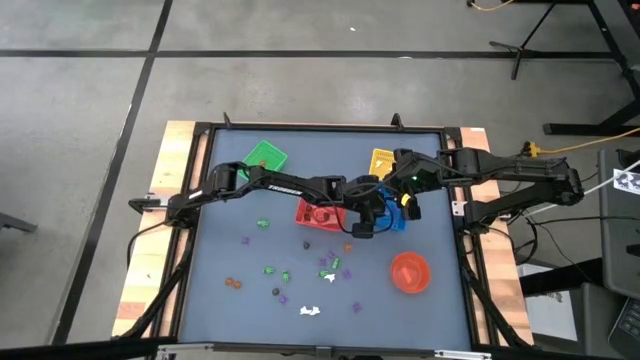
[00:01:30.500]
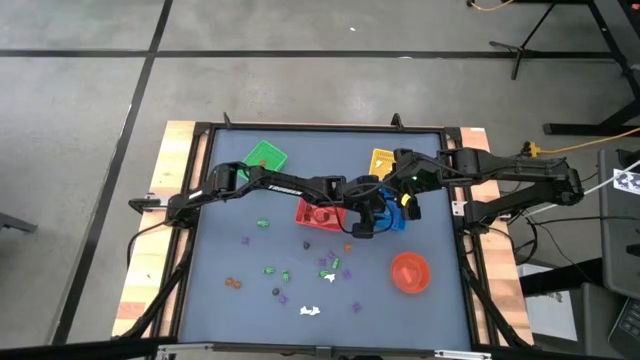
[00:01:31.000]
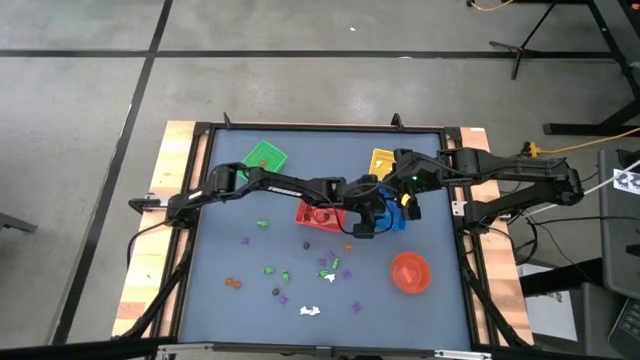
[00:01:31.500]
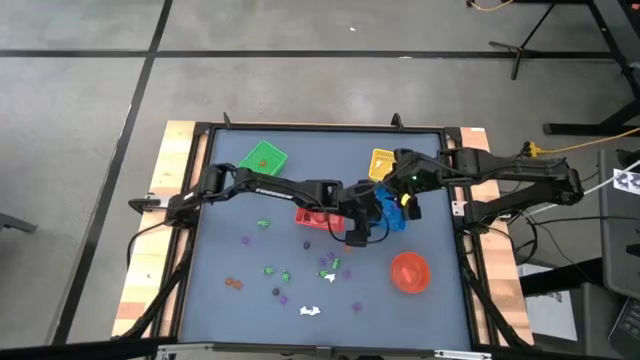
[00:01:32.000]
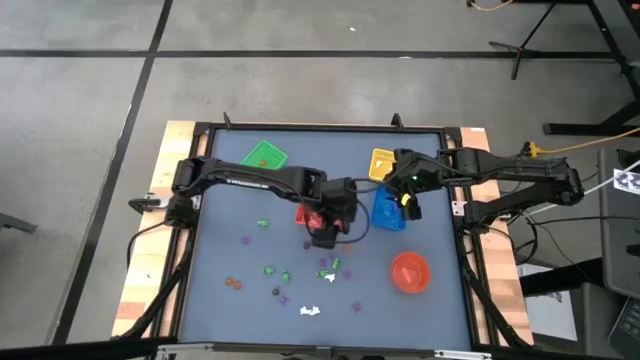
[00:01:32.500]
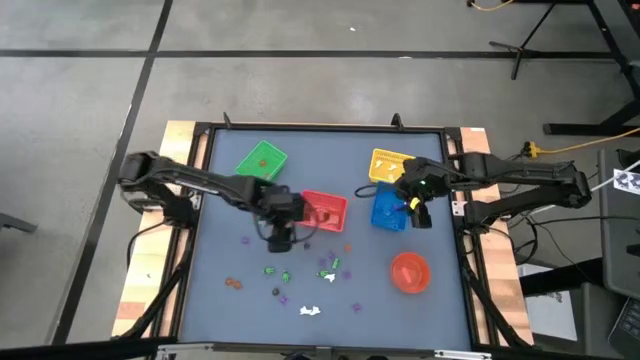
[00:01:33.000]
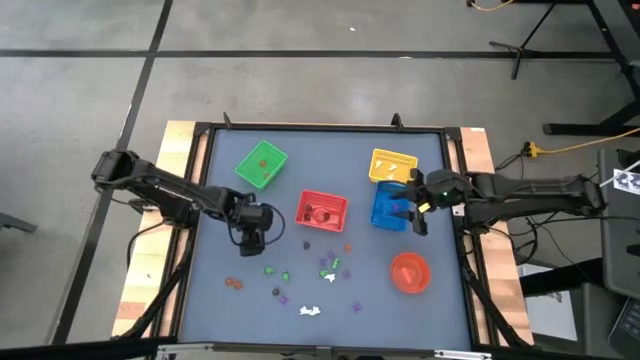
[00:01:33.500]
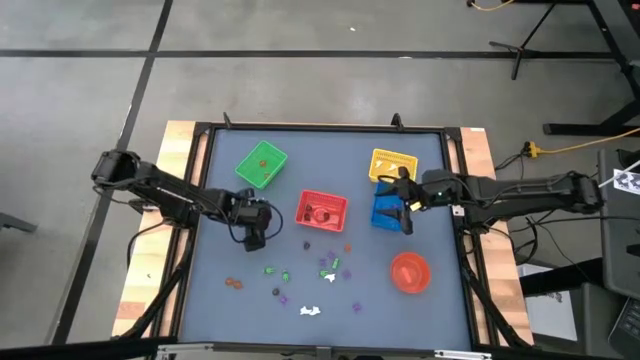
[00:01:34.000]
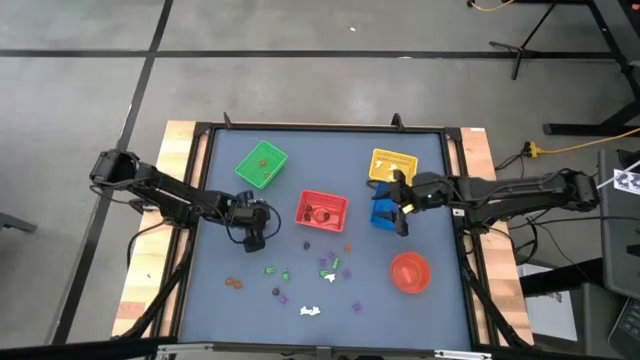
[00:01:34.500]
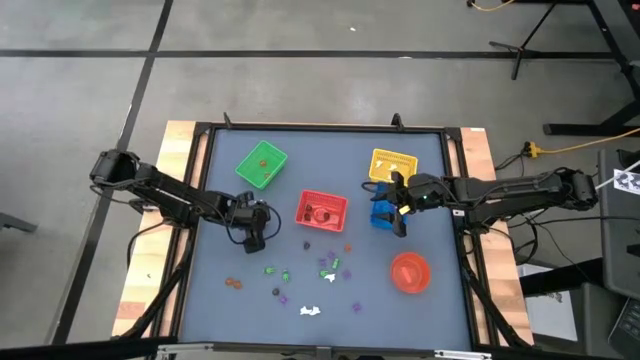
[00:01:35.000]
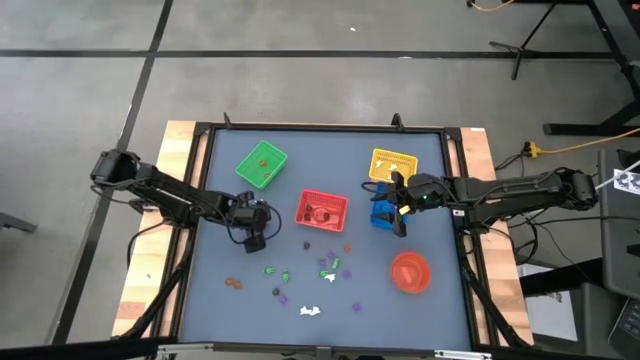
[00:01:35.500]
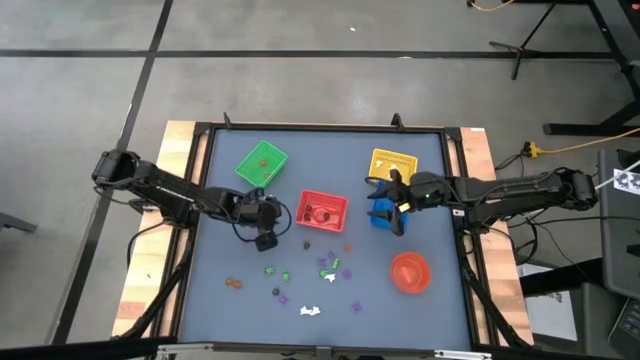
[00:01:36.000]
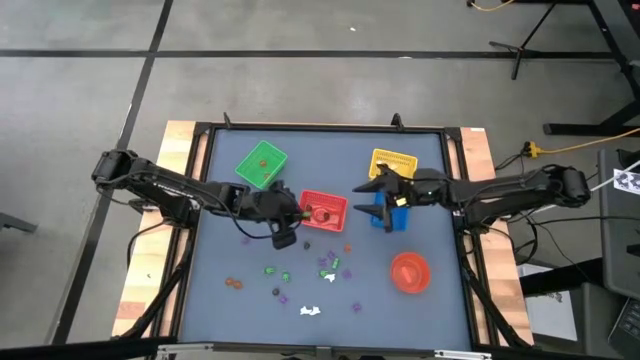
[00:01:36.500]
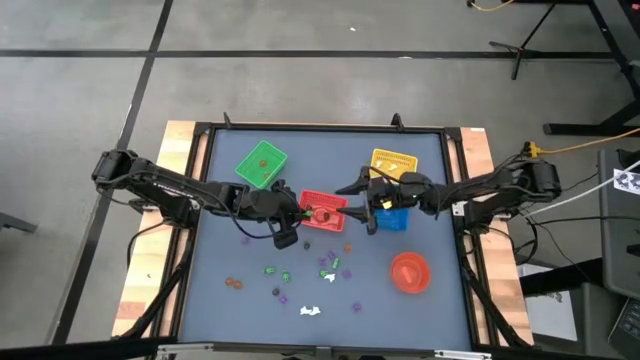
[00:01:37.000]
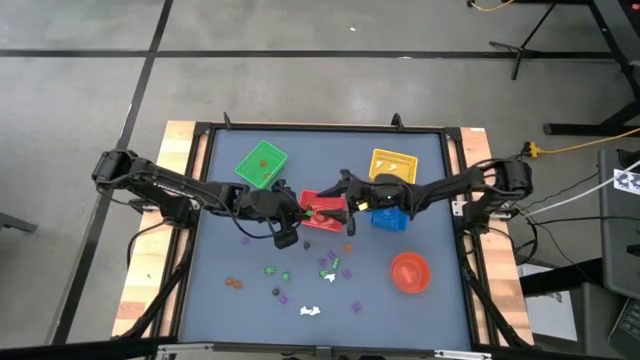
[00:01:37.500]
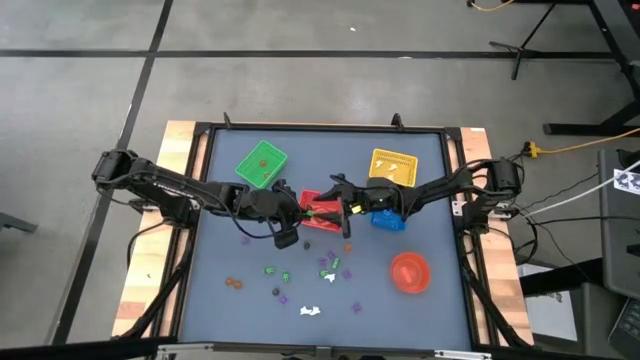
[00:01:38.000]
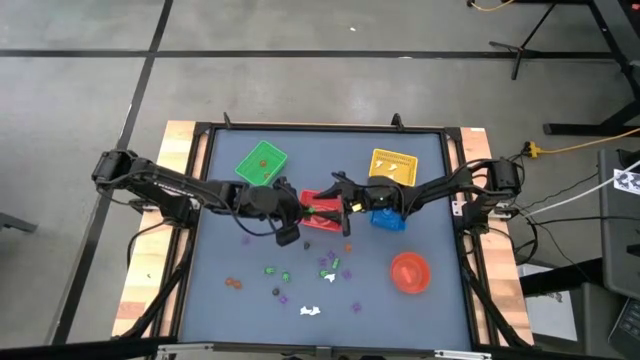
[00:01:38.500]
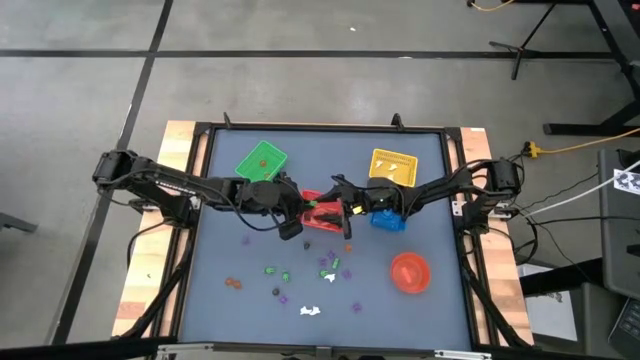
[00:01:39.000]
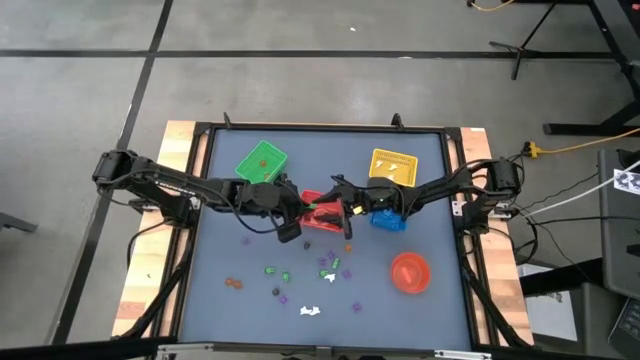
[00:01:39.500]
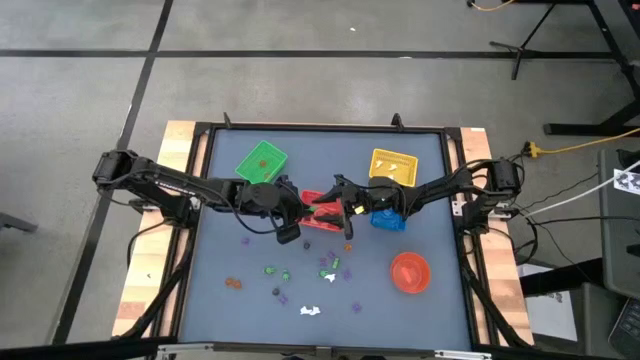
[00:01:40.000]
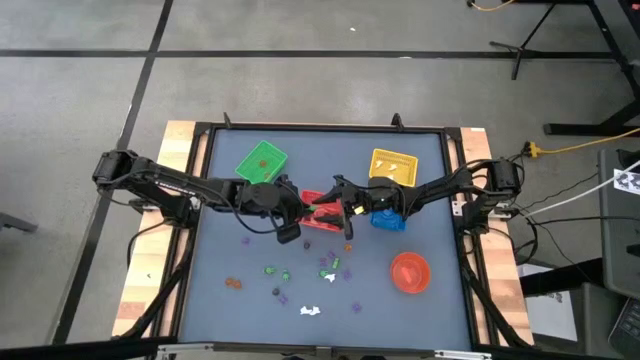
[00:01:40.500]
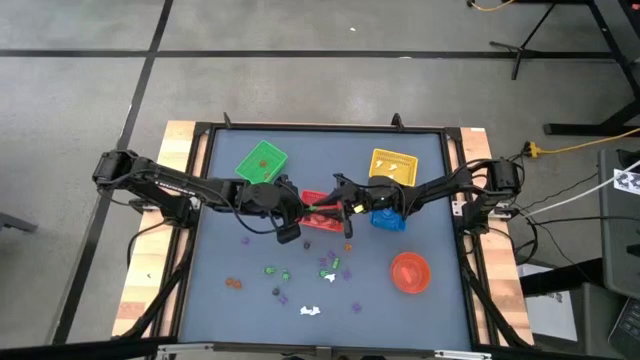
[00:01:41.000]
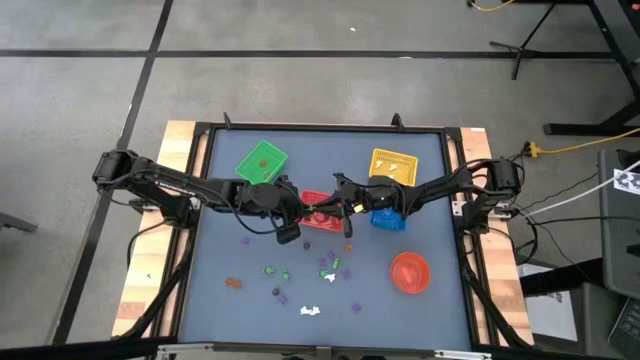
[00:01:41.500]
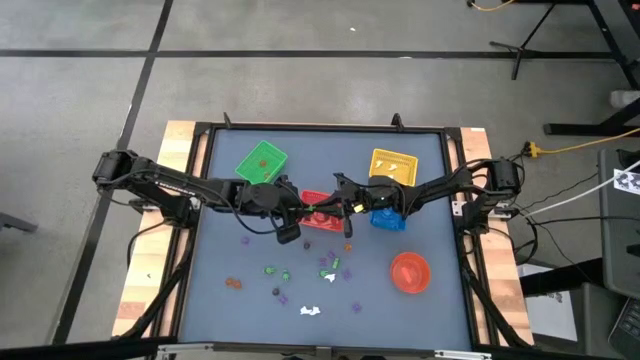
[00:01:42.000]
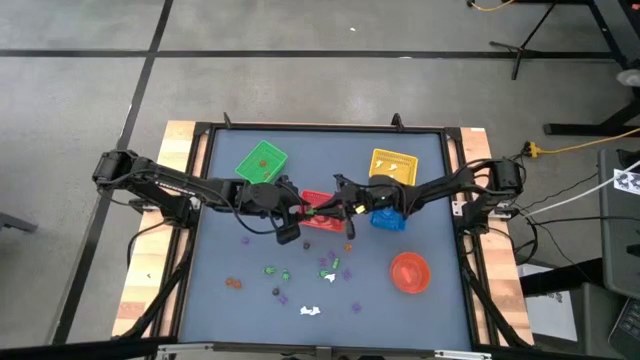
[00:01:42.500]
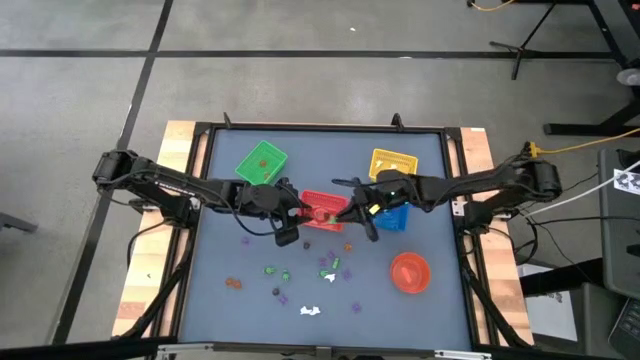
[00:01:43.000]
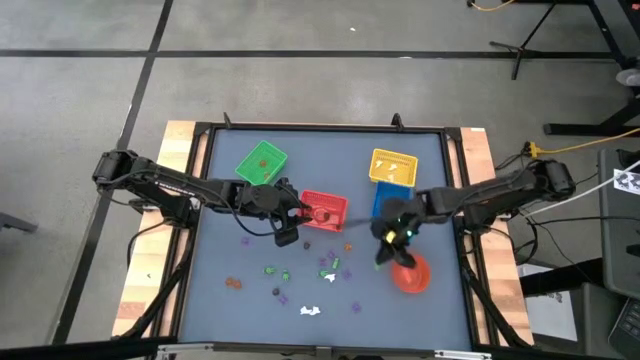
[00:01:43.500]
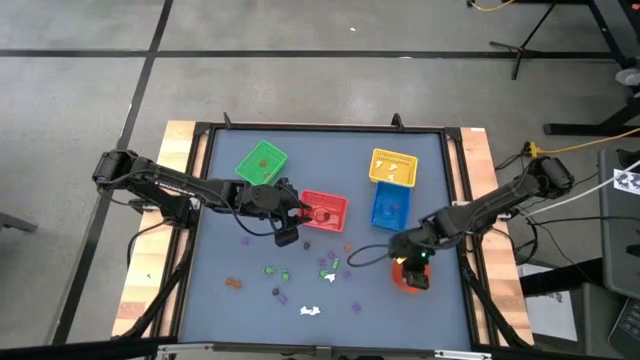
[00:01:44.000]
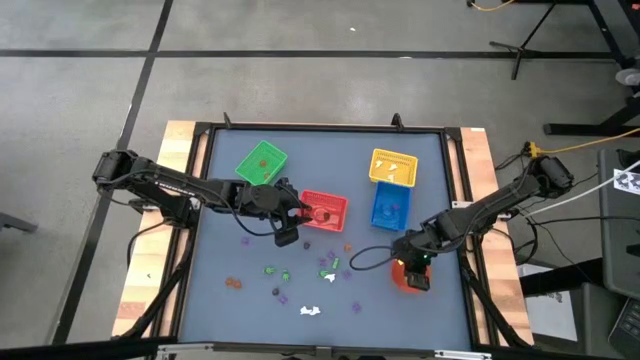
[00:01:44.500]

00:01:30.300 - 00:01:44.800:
Task: Sort Halloween decoration
Put the green skeleton toy into the orange bin

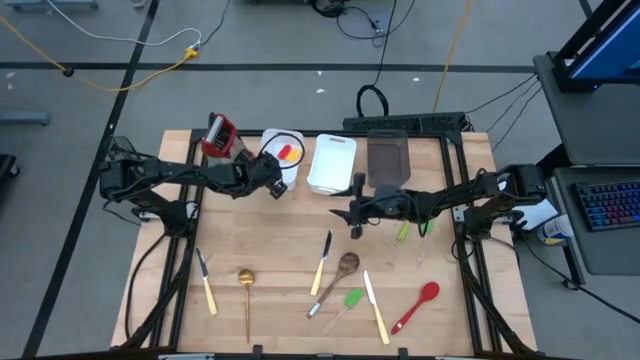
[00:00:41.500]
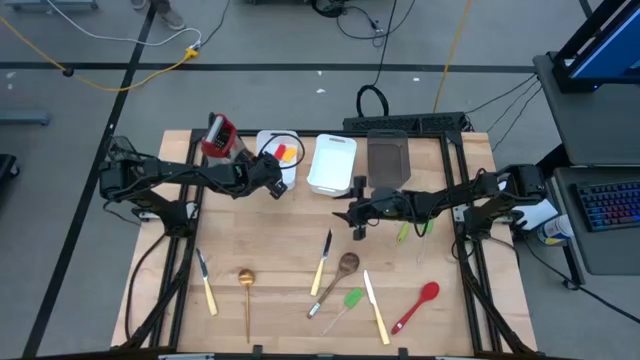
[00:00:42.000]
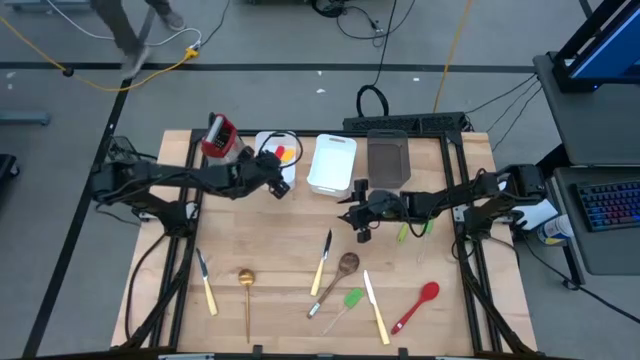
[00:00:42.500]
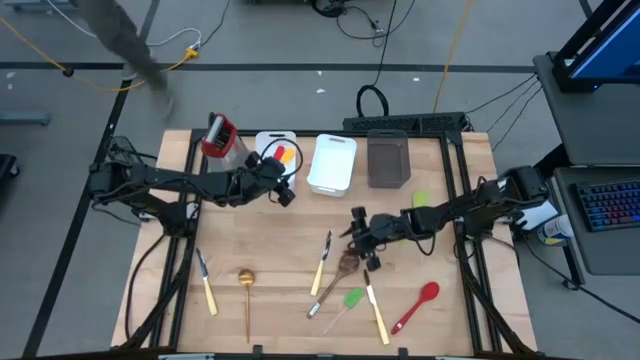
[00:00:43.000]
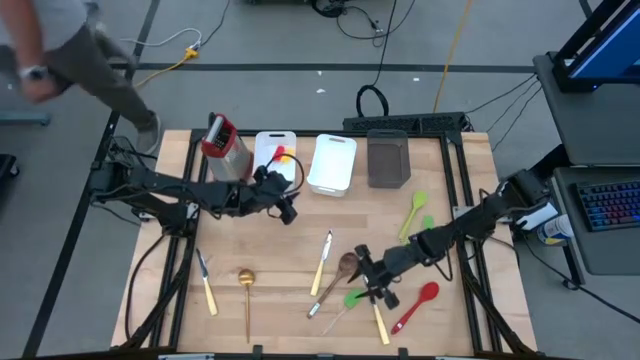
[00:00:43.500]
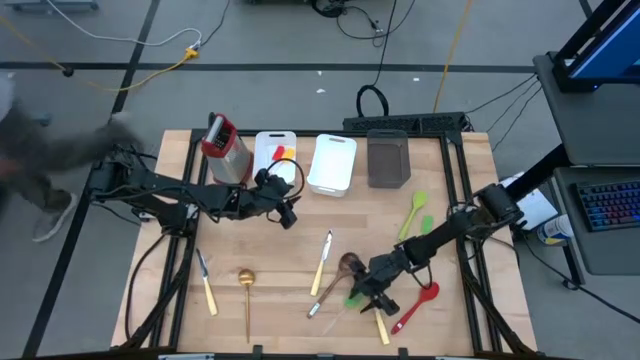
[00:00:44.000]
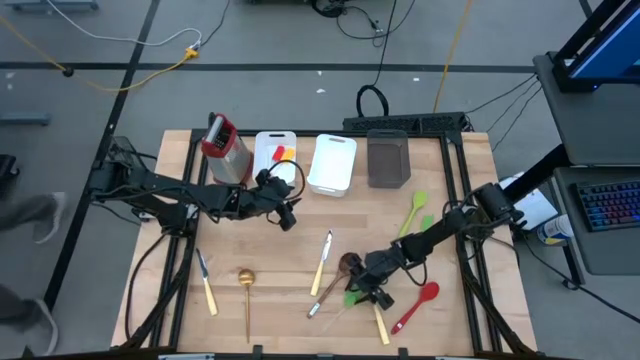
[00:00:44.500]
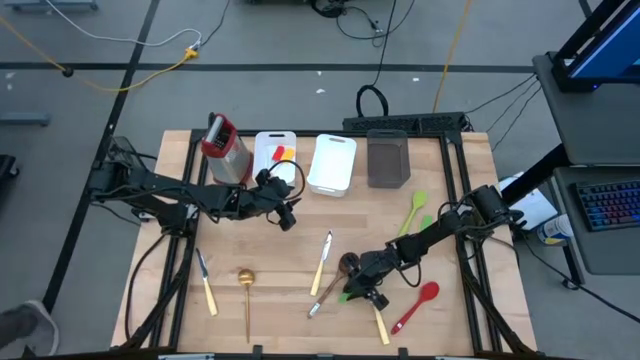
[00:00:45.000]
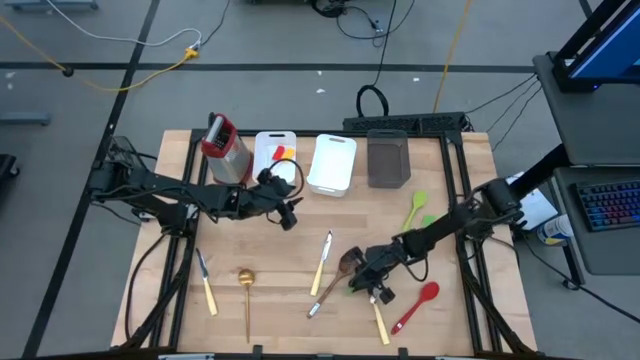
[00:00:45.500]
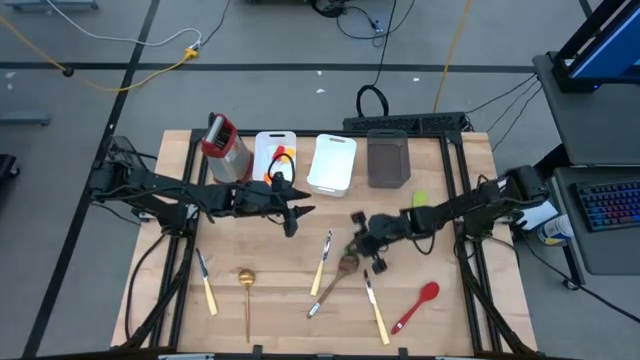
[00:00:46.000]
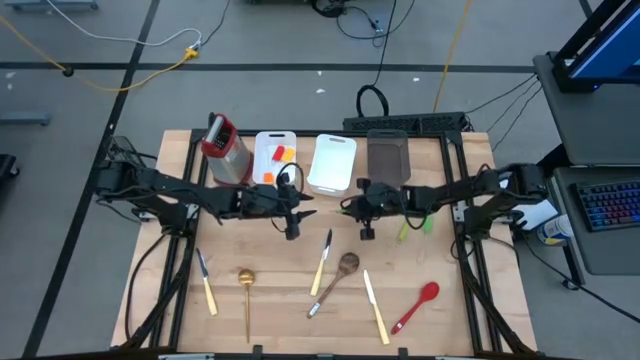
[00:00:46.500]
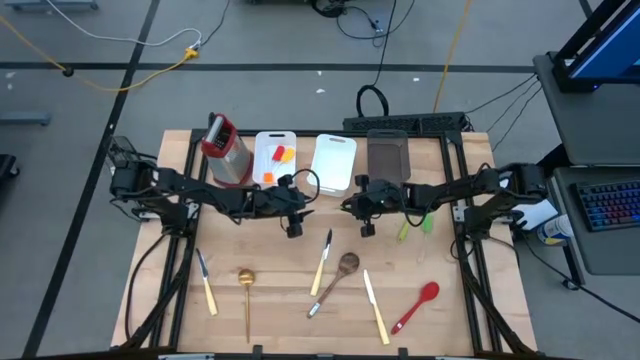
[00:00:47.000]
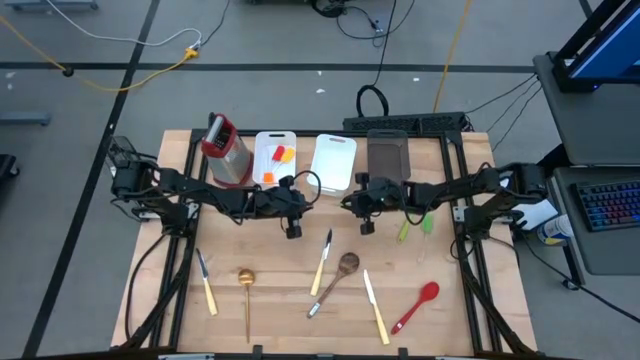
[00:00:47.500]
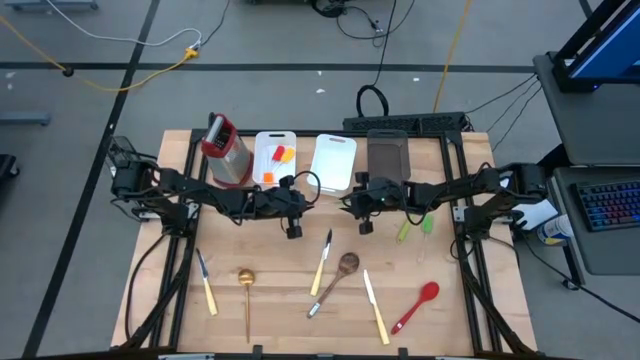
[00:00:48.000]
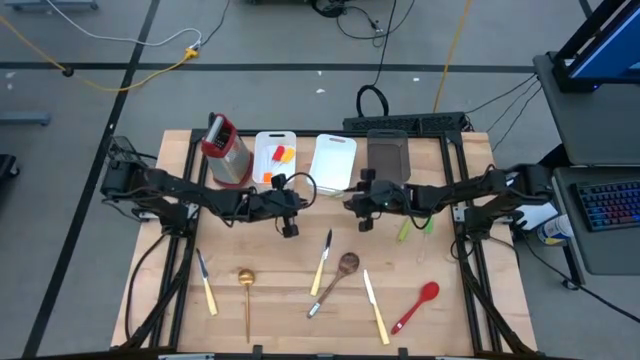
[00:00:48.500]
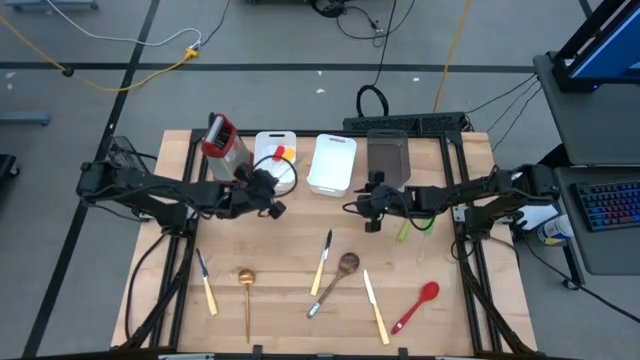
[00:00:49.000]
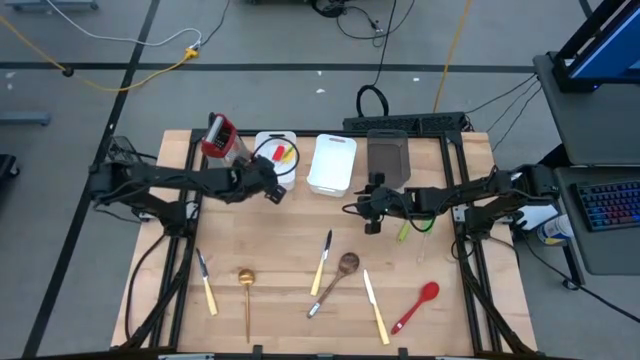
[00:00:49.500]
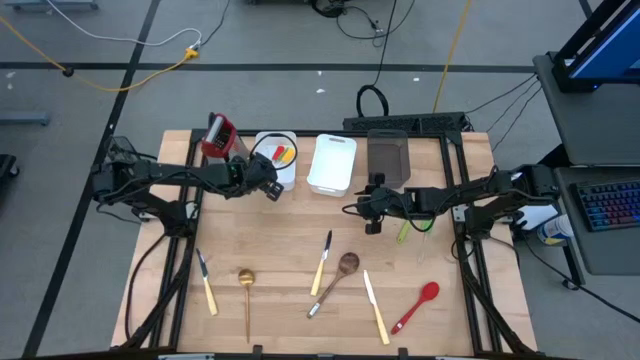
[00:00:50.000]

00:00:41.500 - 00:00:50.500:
Task: Pick & Place Kitchen Items
Put the bottom green spatula into the left white bin
